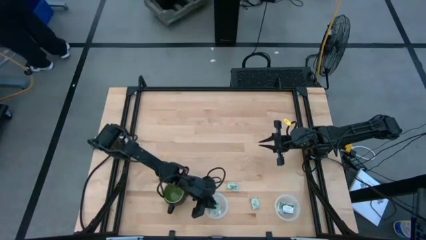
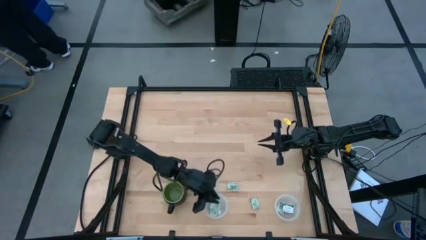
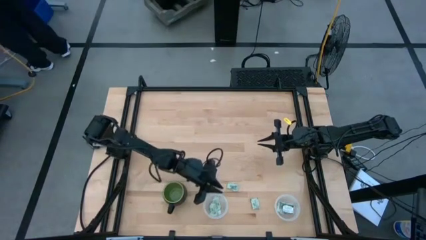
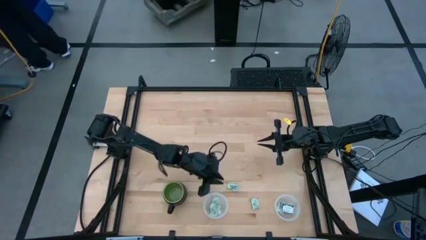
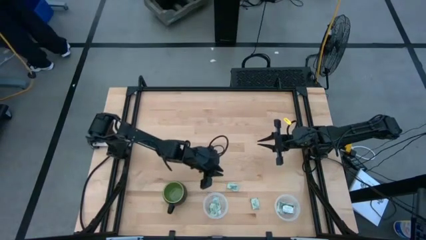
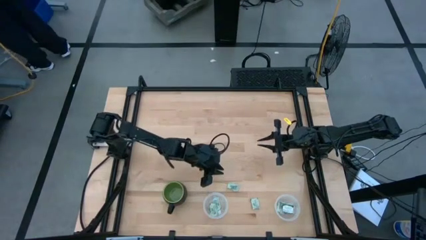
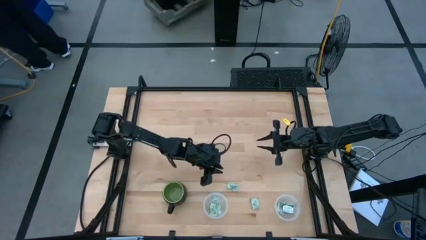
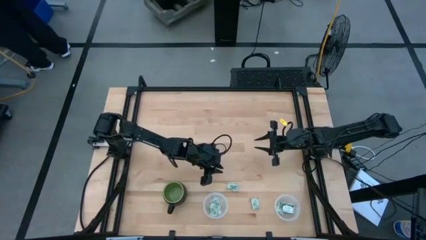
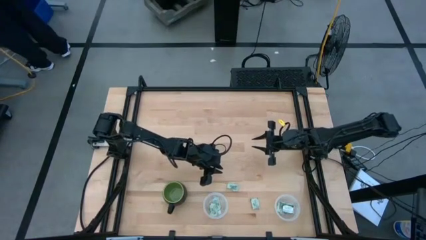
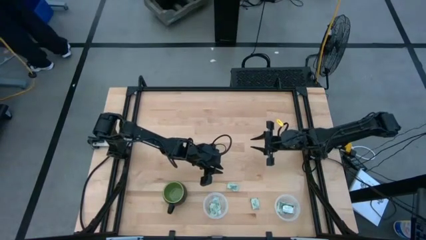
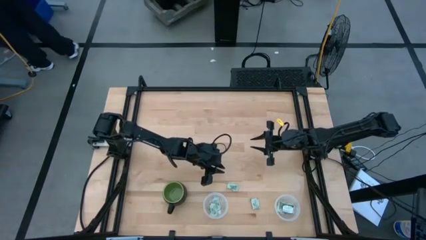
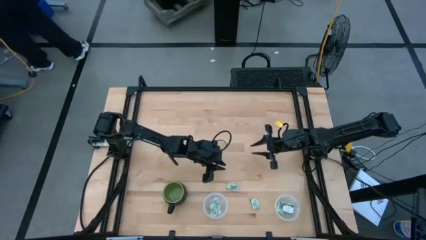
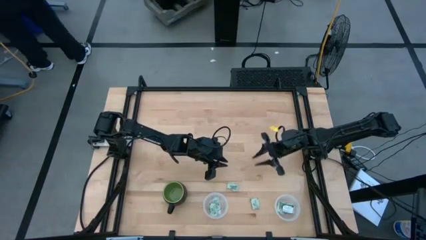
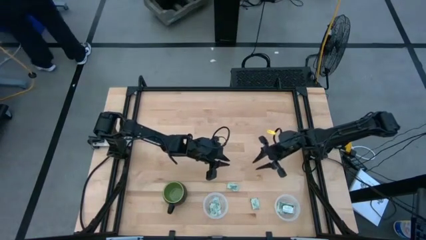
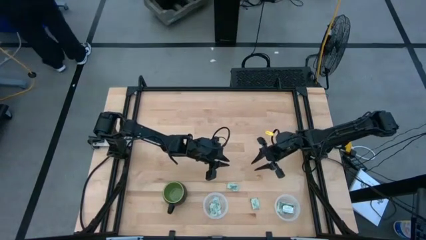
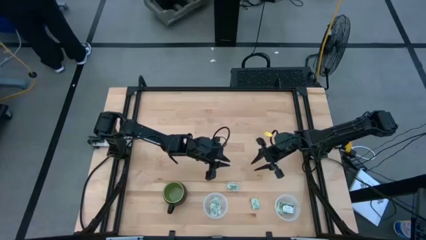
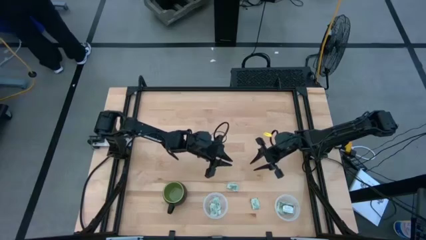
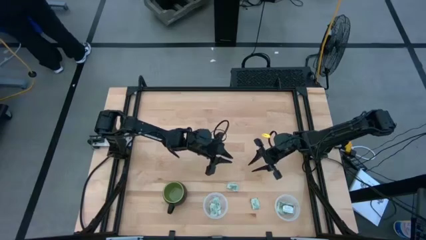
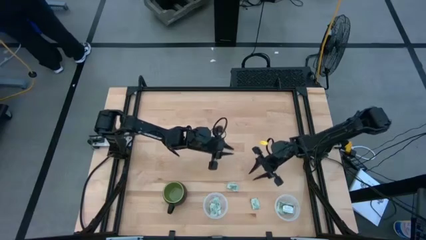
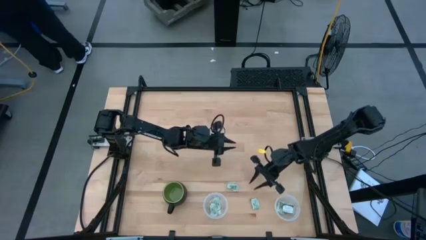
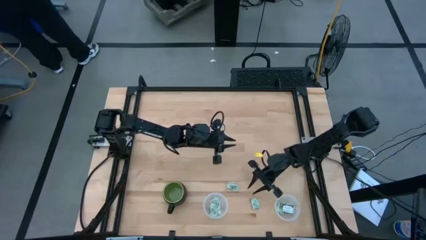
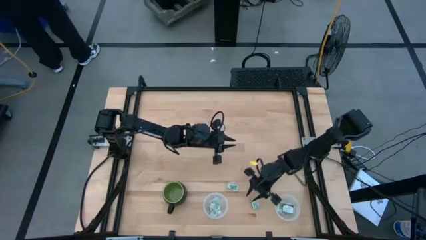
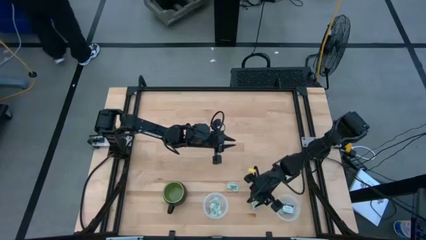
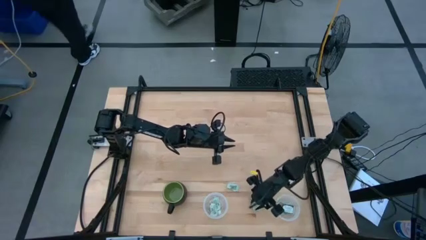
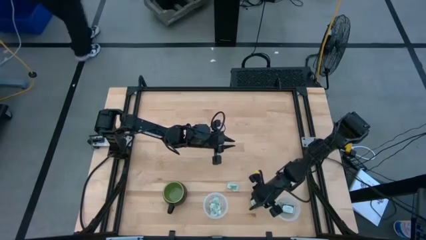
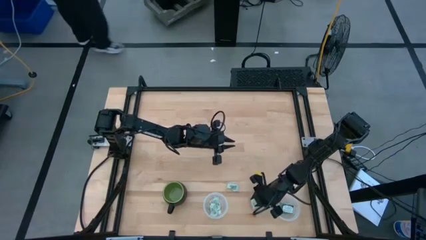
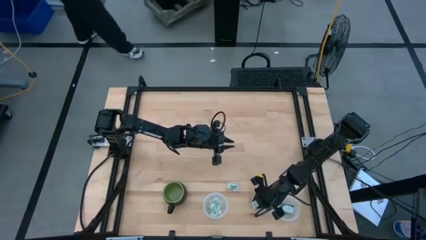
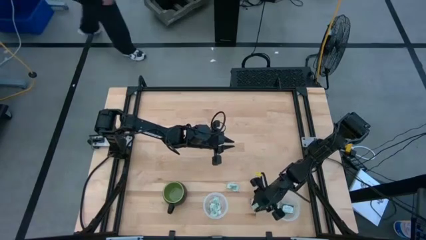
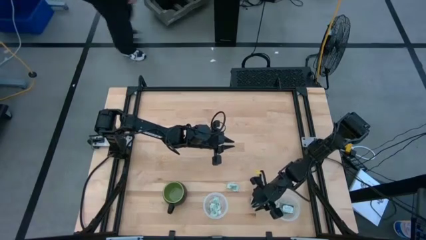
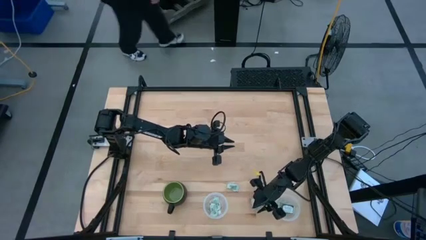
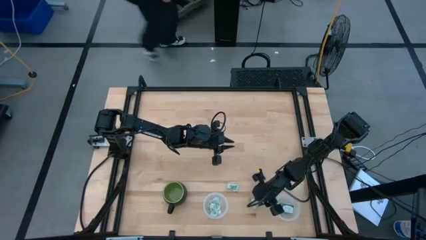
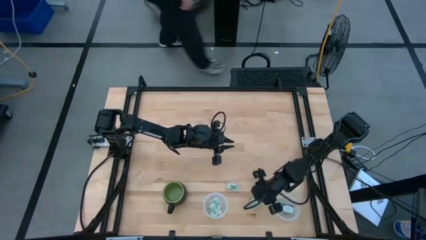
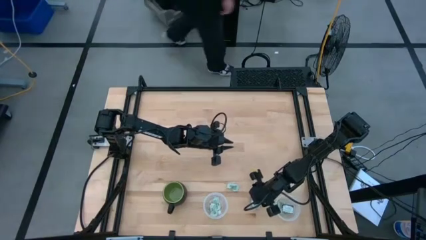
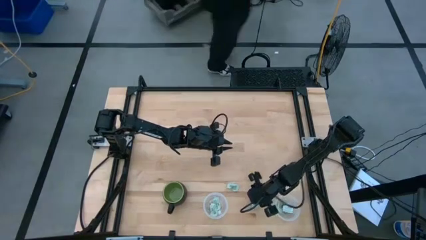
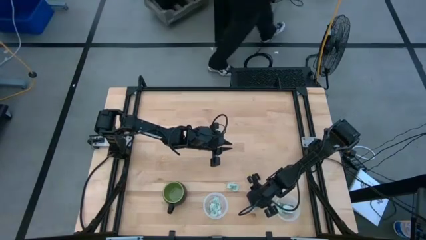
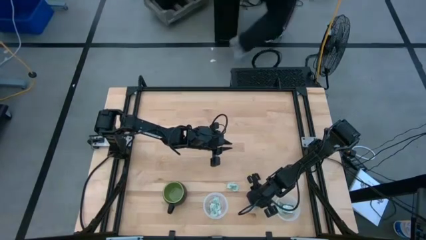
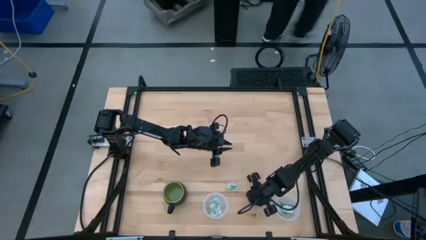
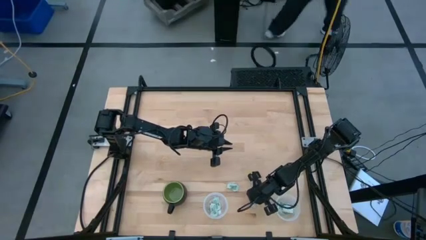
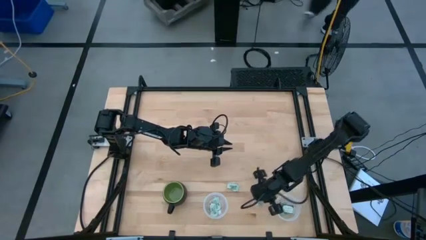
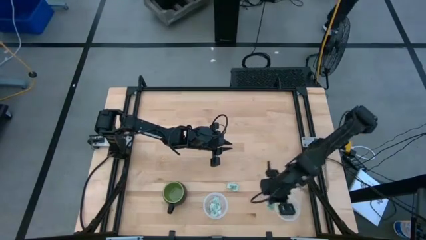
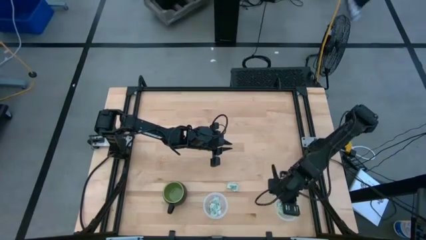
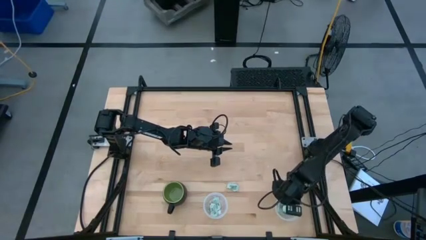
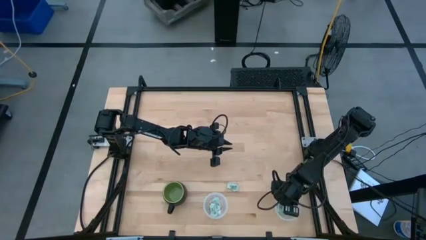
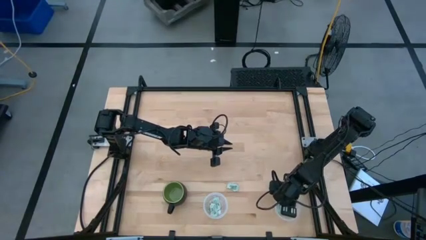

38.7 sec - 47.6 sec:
Task: Pick and place Stevia / Truvia into bins
Put the green stevia packet into the right transparent container

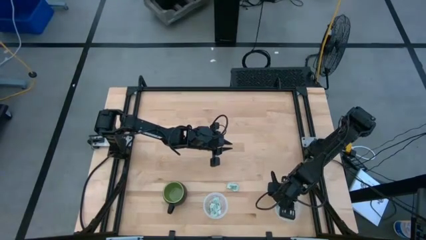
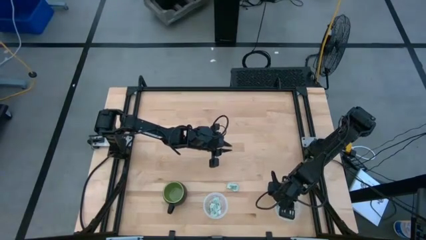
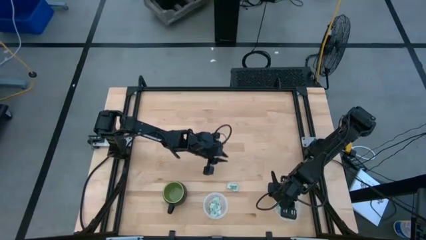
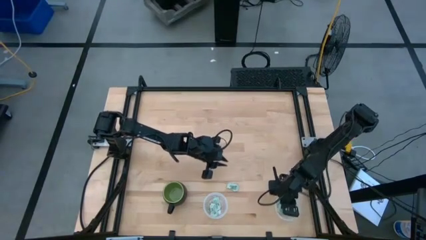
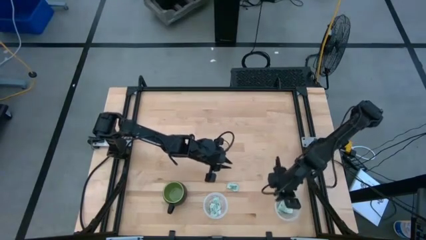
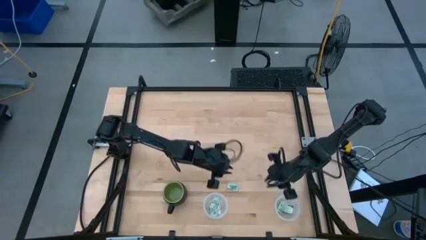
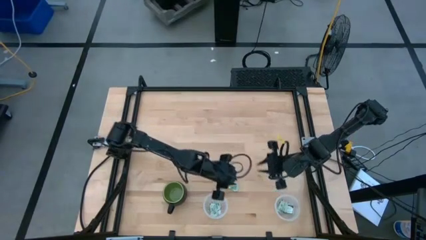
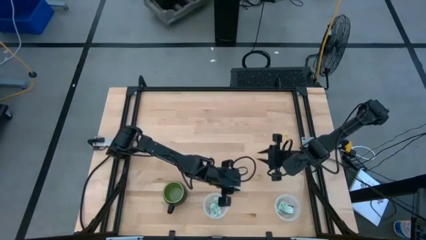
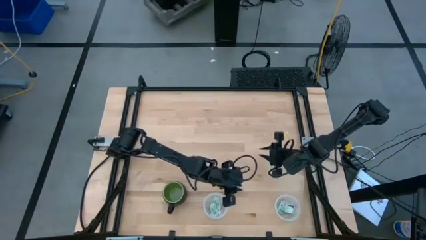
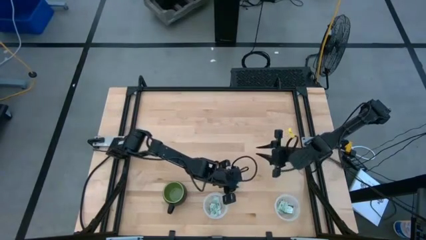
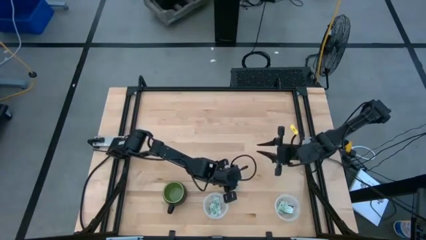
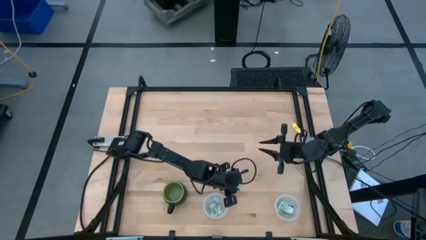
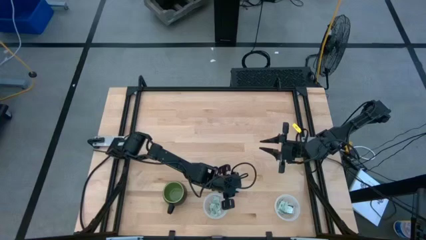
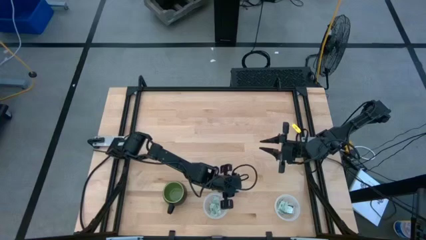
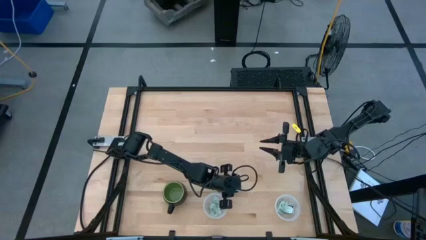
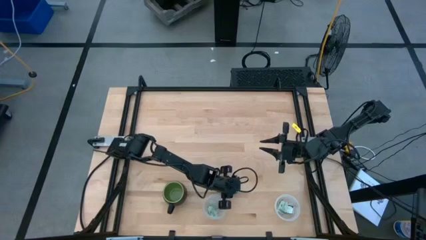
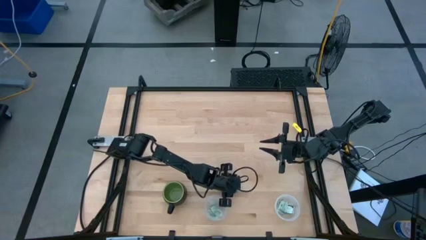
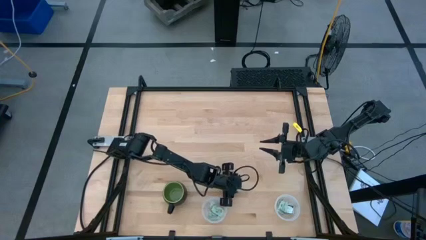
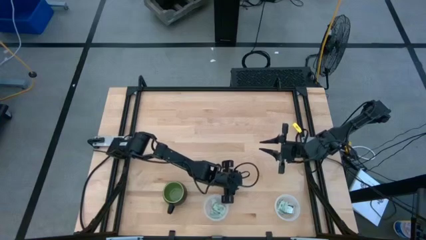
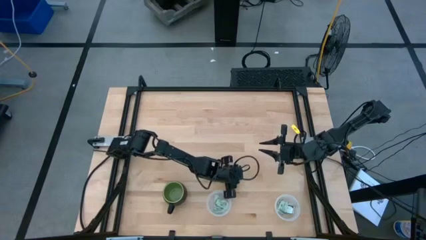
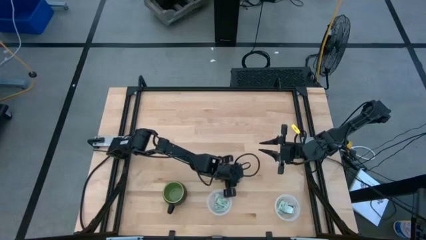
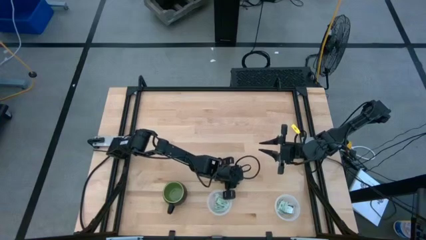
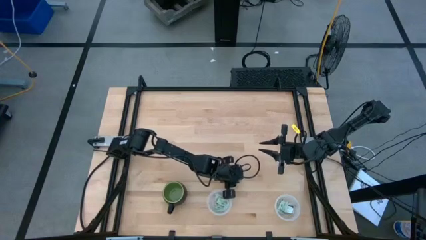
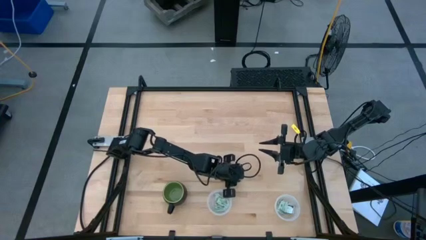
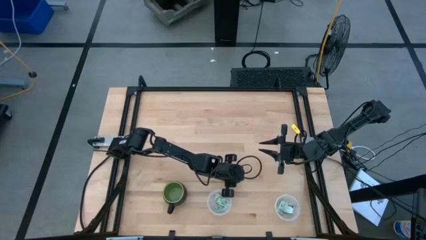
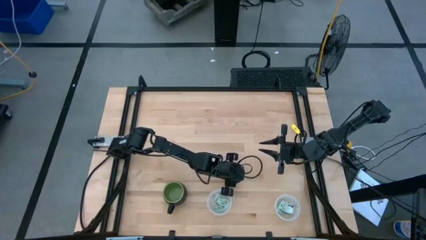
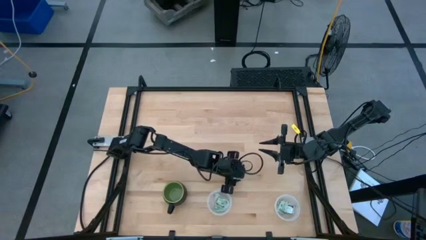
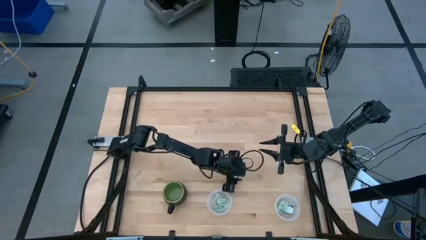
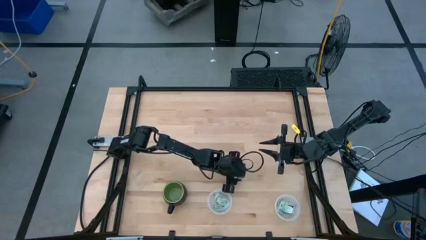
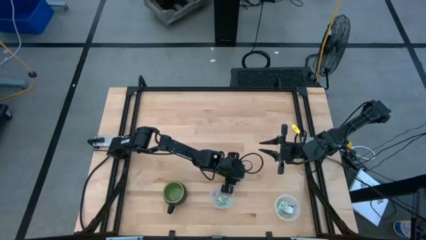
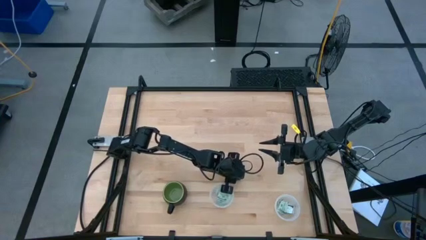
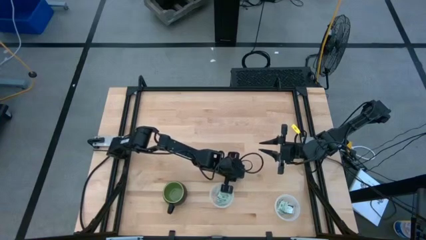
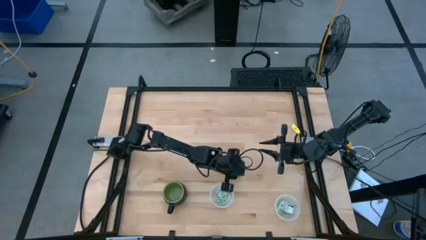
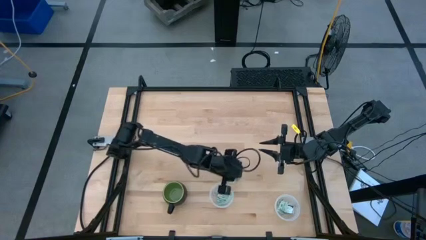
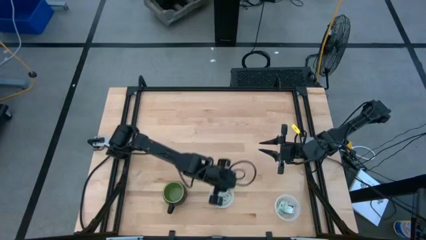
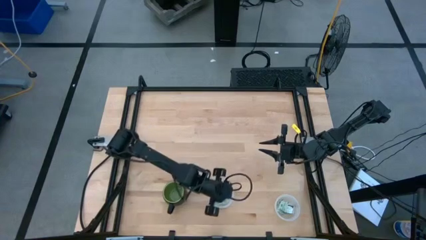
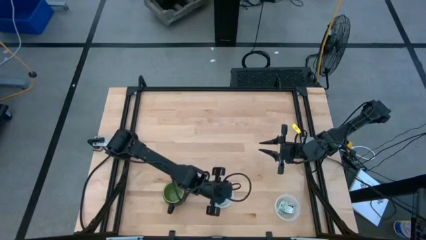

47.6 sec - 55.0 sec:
Put the green stevia packet into the left transparent container
